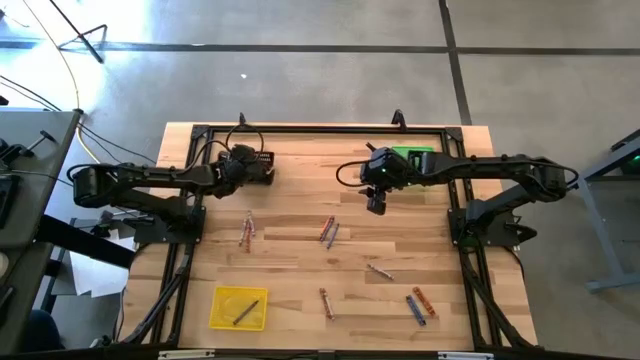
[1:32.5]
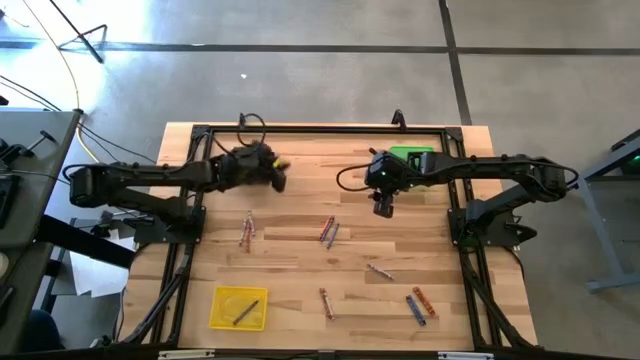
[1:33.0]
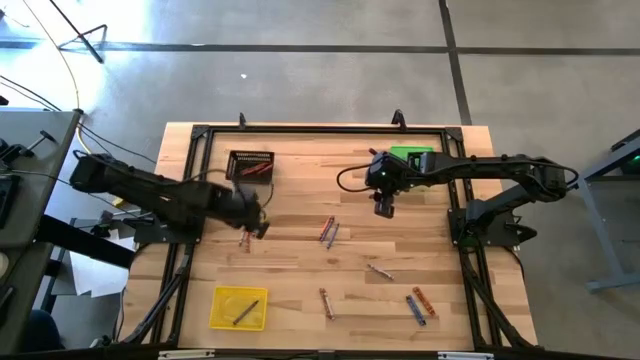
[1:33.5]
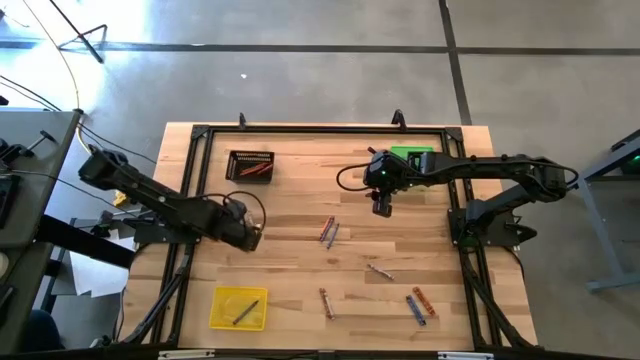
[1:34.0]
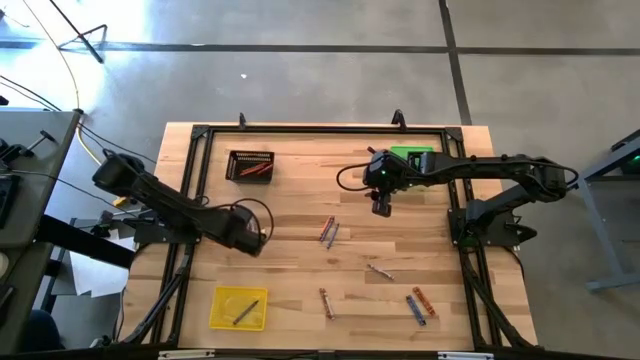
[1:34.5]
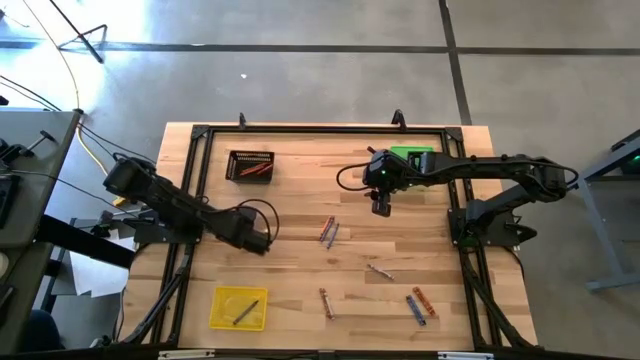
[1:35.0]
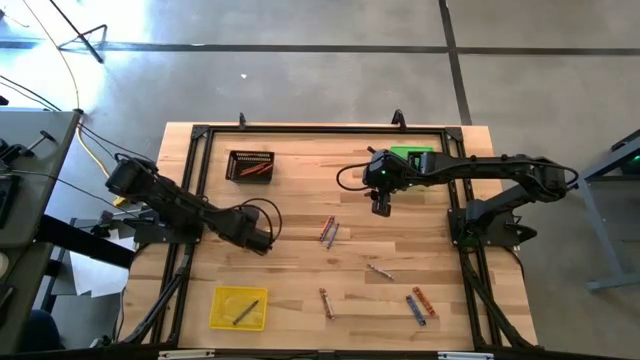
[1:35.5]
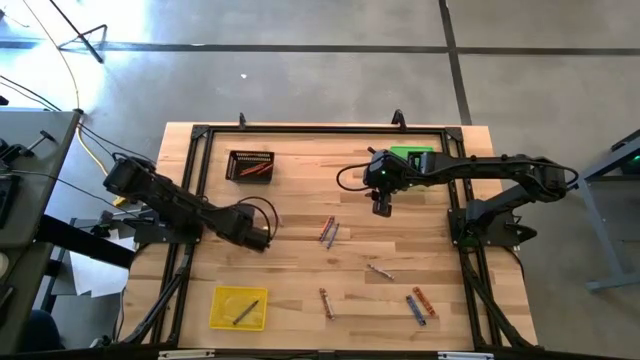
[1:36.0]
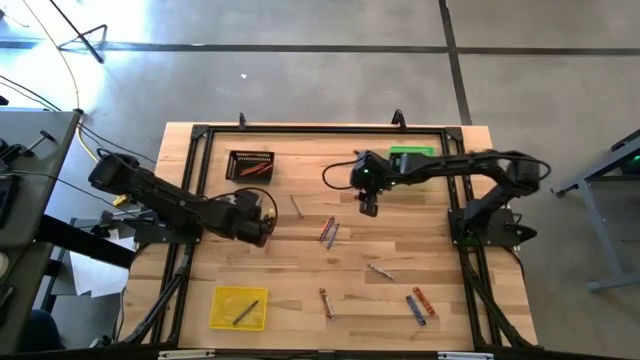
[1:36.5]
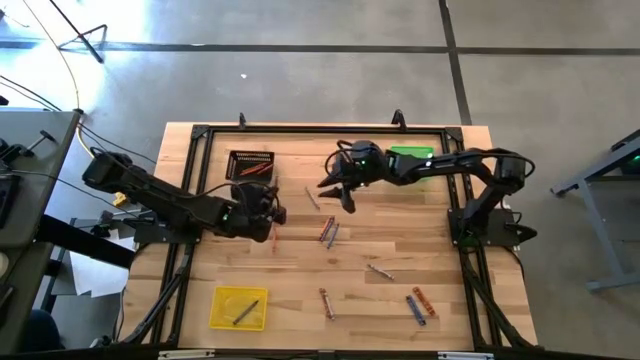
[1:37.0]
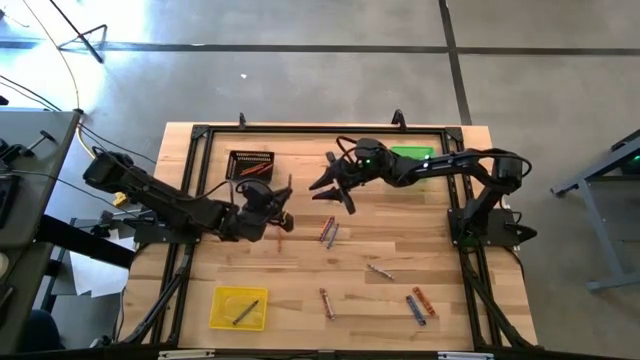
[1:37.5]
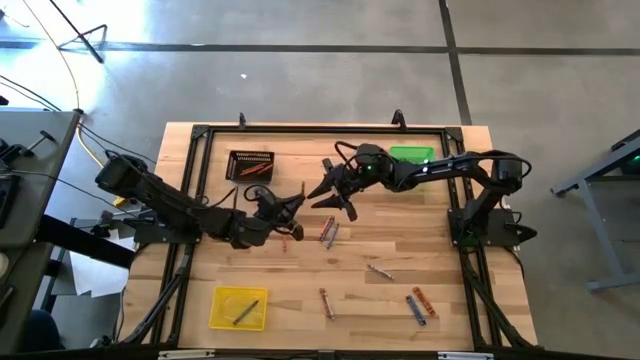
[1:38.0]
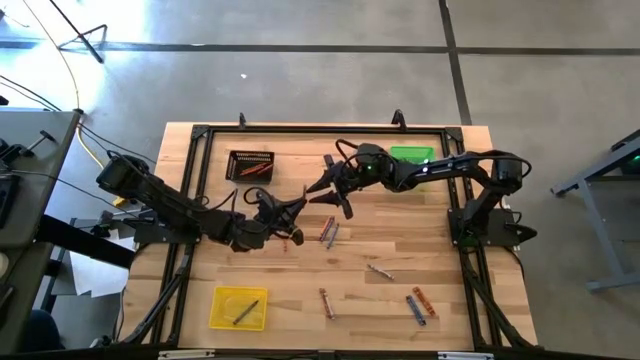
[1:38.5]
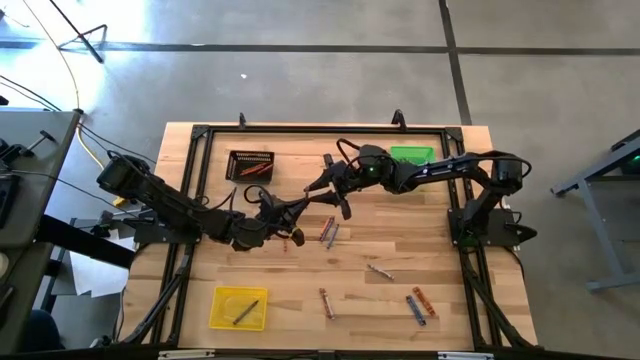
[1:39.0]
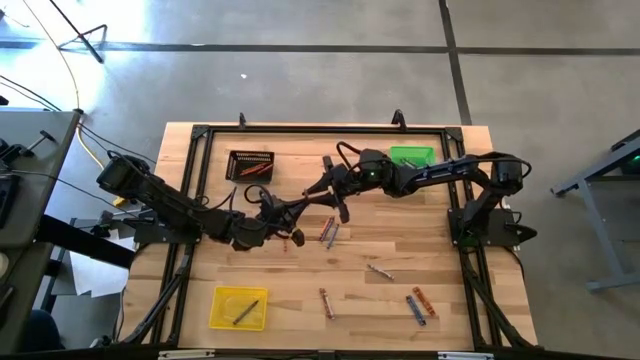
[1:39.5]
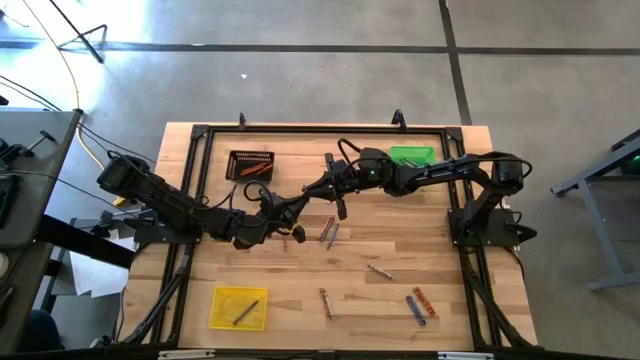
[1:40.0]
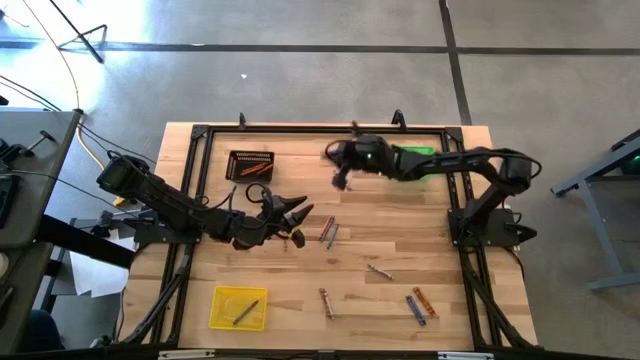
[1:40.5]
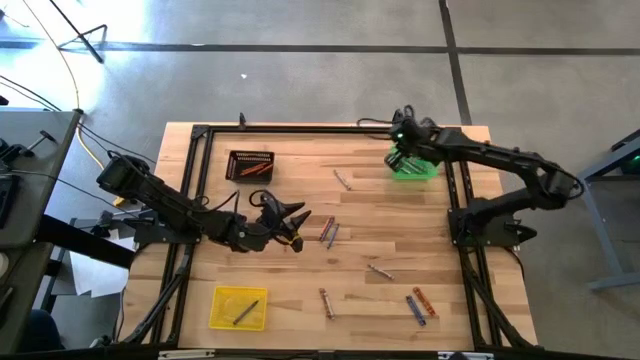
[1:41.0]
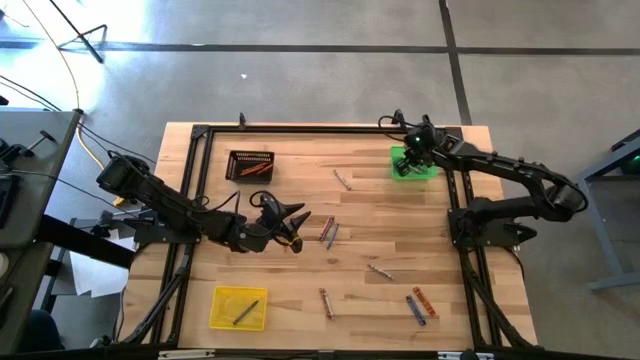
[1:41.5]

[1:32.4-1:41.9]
Task: Sort crayons
Put the gray crayon into the green bin

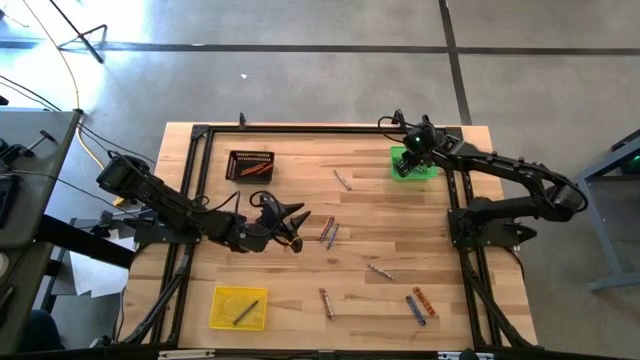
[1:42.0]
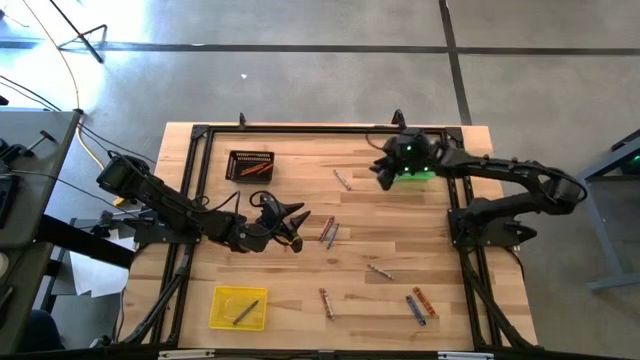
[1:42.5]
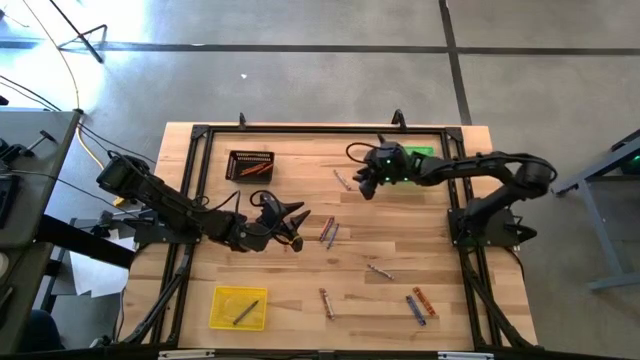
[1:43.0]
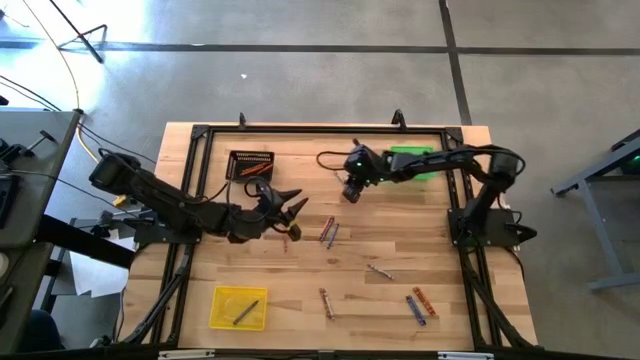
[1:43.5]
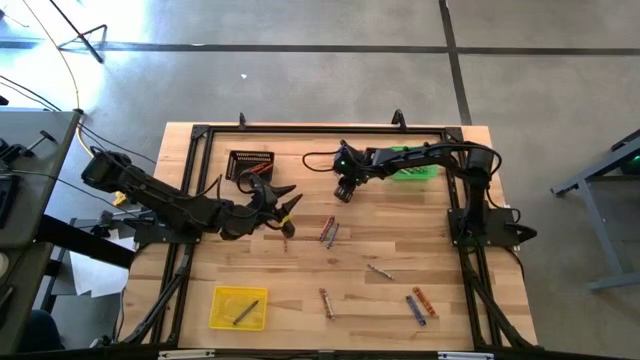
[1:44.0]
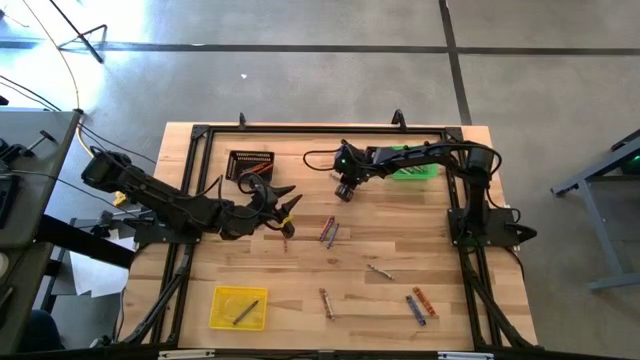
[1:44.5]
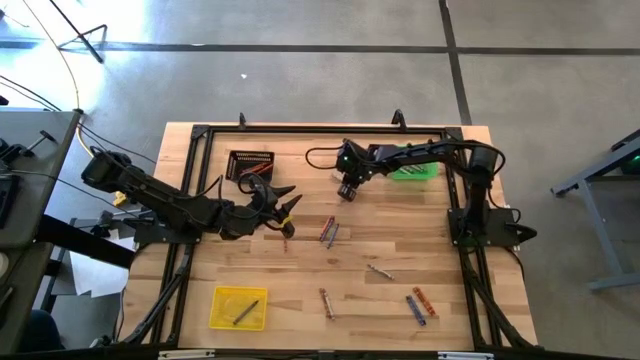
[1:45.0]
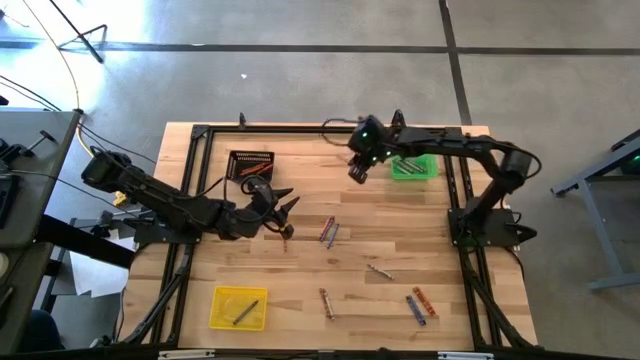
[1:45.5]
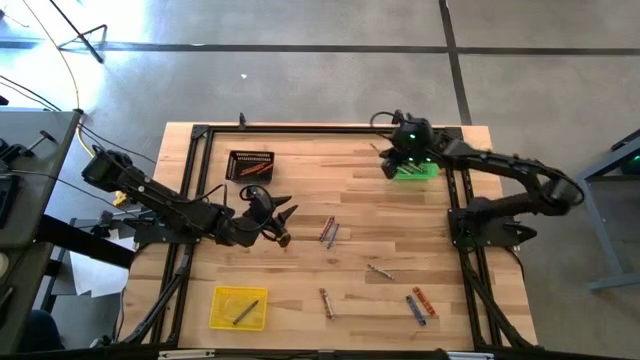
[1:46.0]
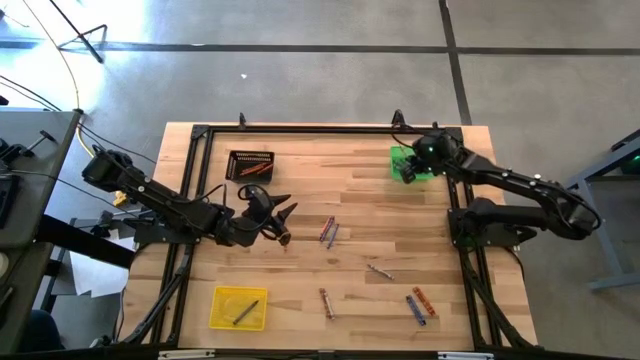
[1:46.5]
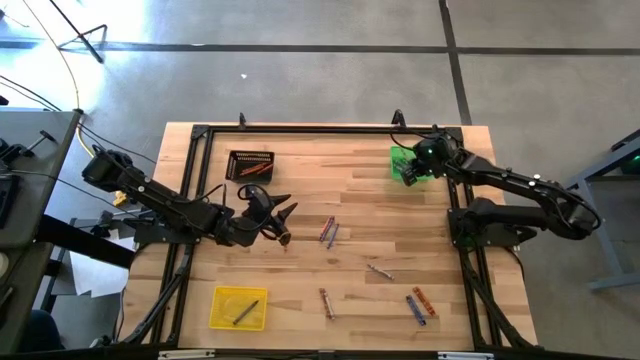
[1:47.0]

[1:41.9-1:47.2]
Put the gray crayon into the green bin

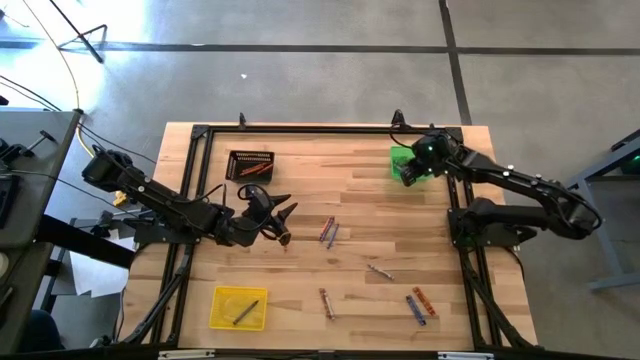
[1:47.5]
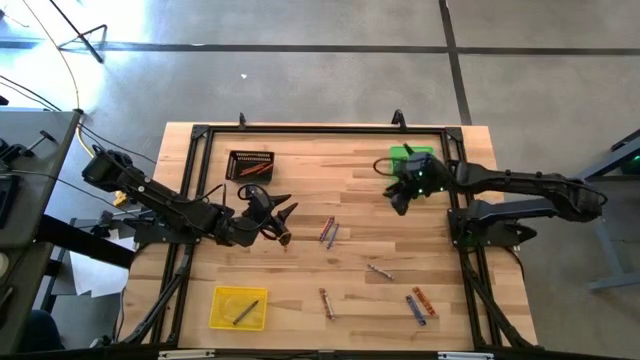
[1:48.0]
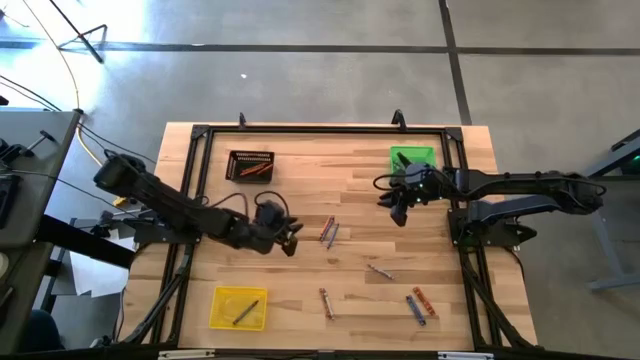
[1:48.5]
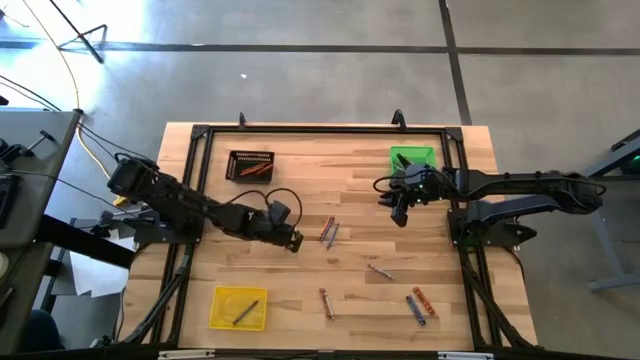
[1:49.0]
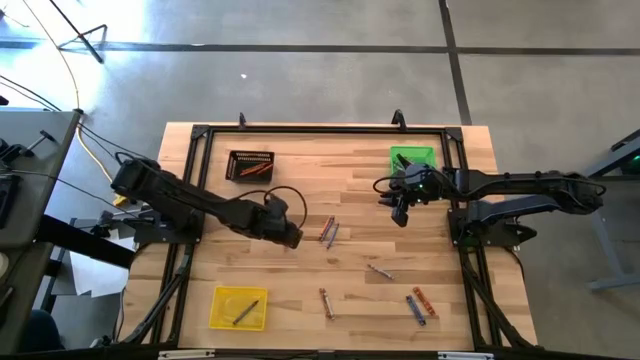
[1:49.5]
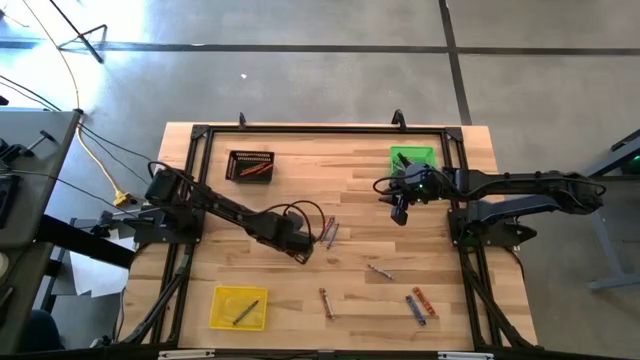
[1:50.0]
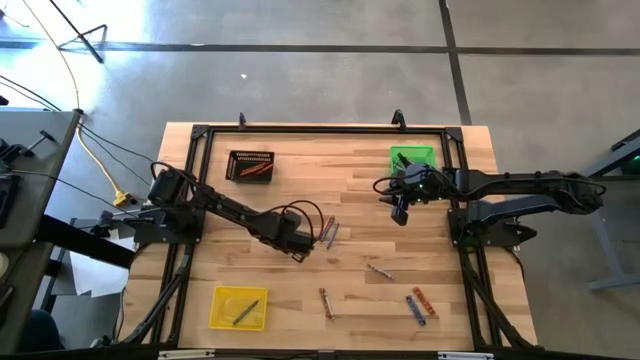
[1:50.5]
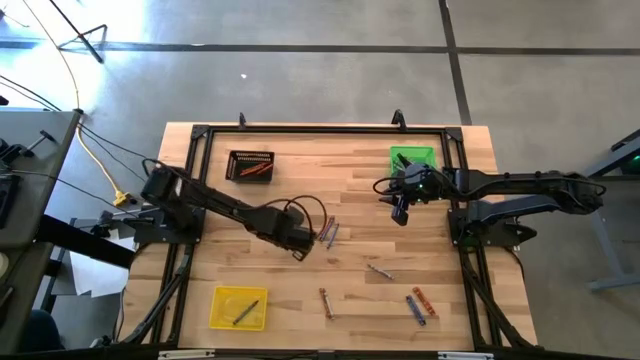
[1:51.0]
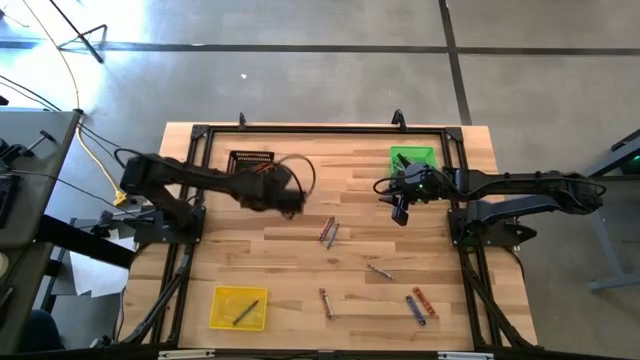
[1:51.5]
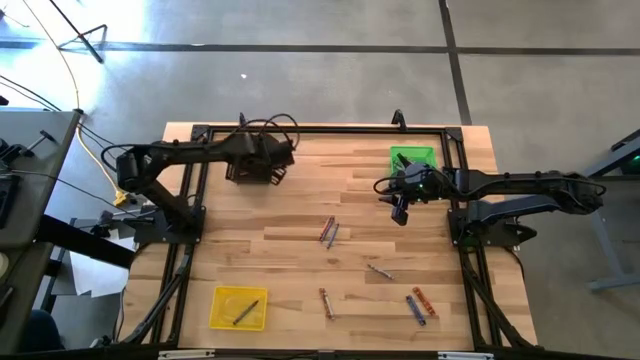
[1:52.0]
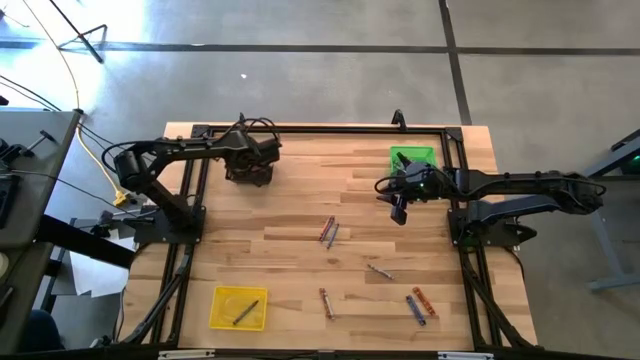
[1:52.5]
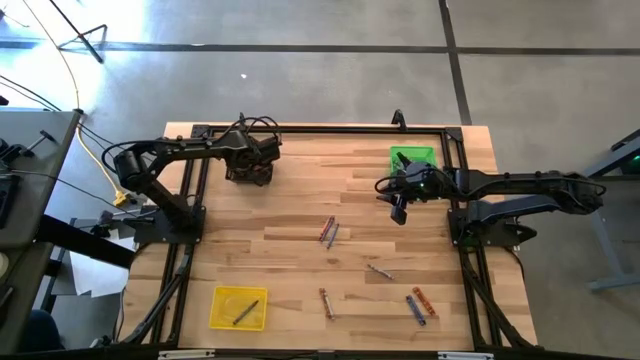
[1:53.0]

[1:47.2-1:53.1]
Put the orange crayon into the black bin
